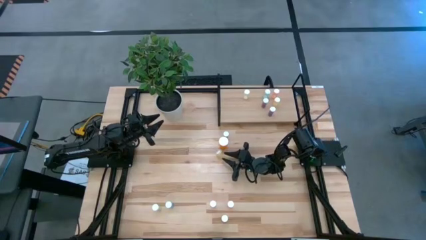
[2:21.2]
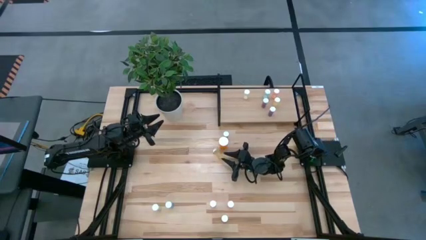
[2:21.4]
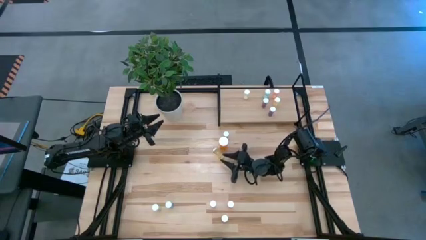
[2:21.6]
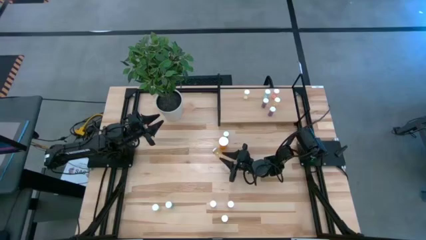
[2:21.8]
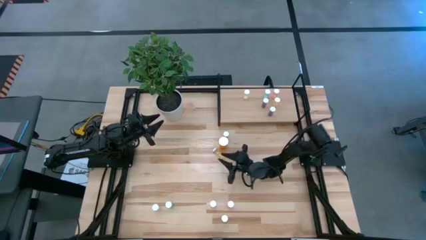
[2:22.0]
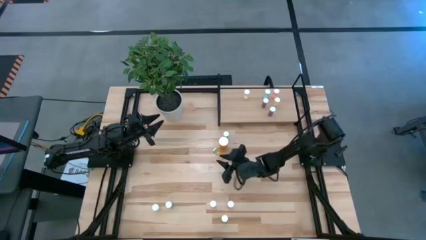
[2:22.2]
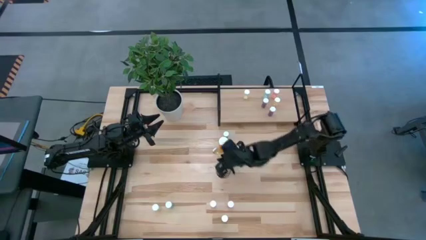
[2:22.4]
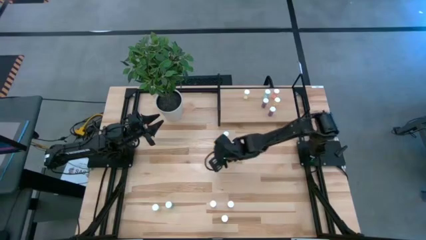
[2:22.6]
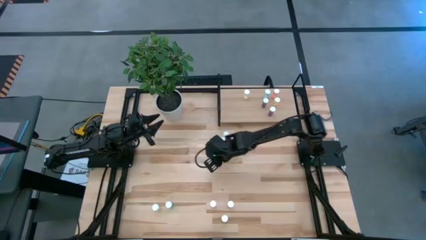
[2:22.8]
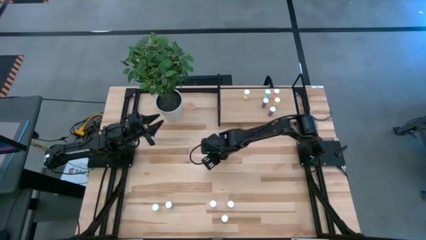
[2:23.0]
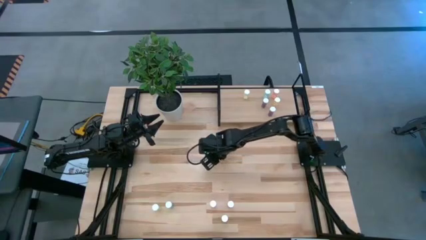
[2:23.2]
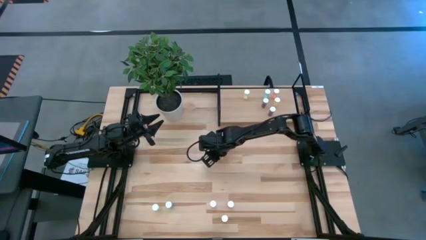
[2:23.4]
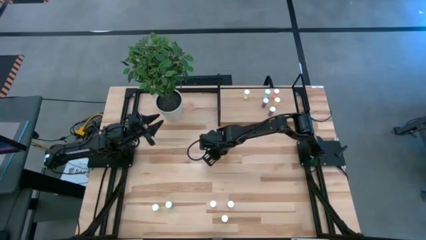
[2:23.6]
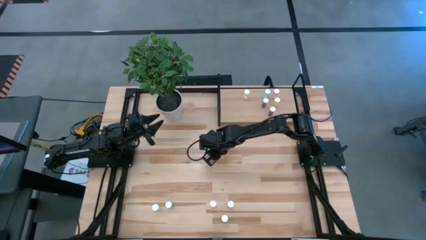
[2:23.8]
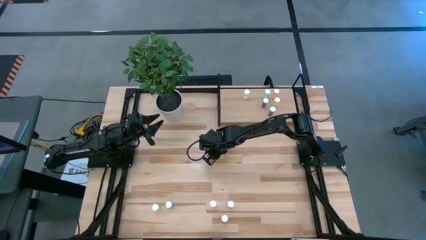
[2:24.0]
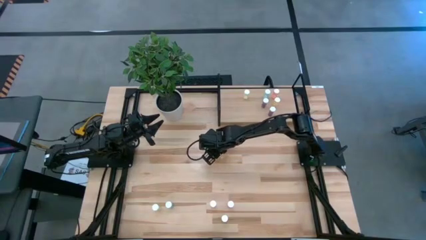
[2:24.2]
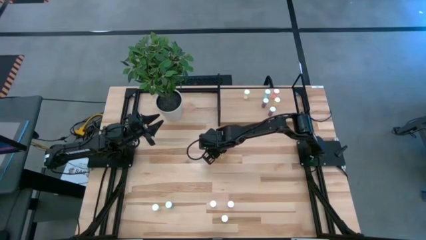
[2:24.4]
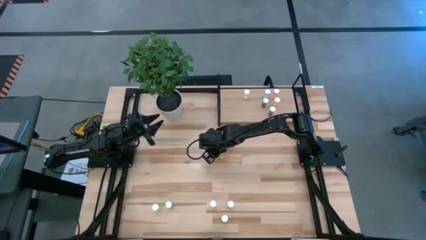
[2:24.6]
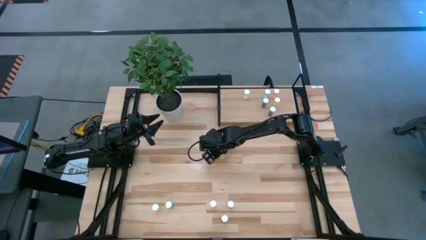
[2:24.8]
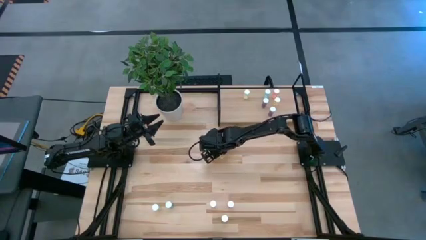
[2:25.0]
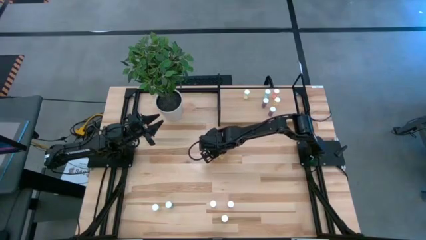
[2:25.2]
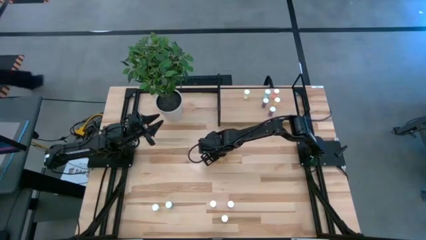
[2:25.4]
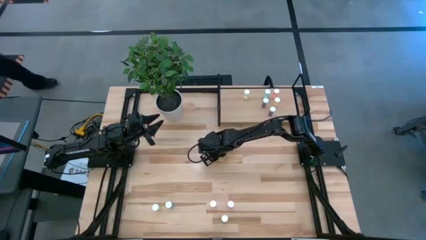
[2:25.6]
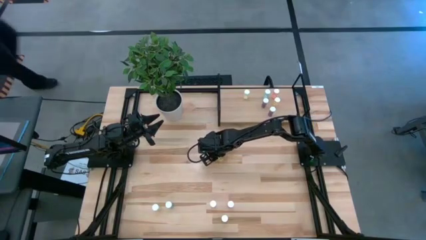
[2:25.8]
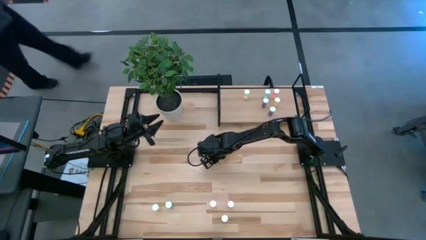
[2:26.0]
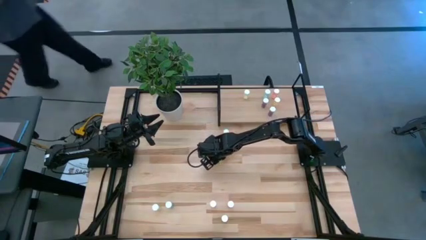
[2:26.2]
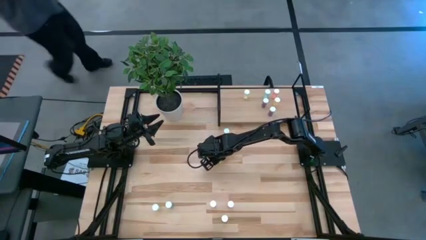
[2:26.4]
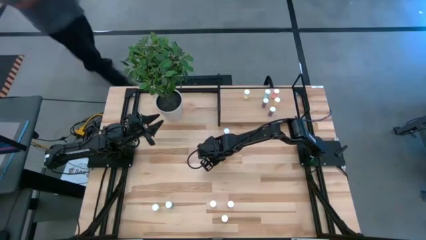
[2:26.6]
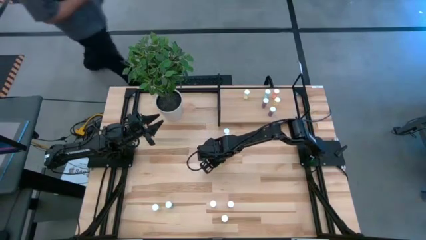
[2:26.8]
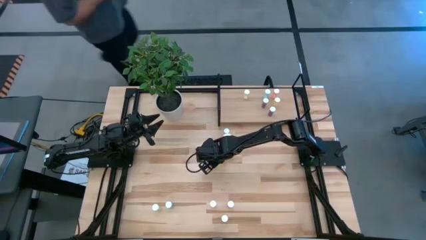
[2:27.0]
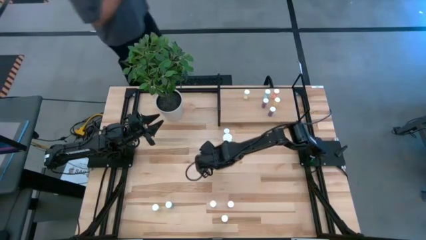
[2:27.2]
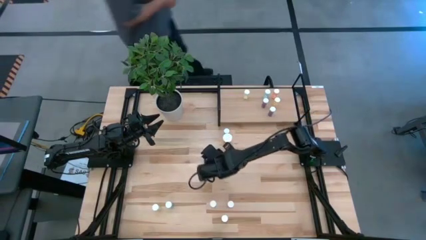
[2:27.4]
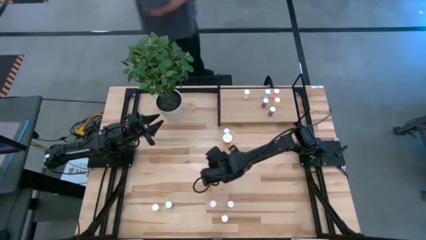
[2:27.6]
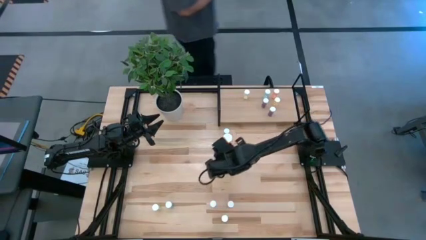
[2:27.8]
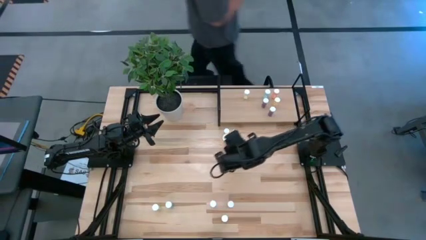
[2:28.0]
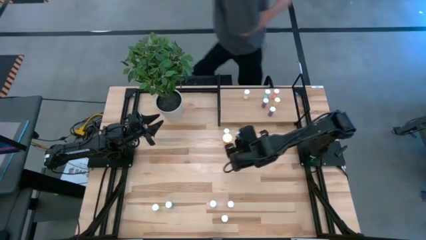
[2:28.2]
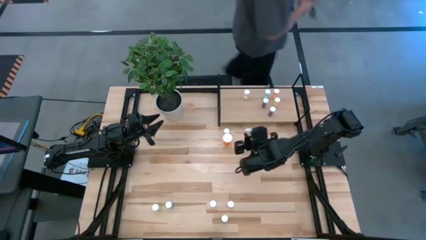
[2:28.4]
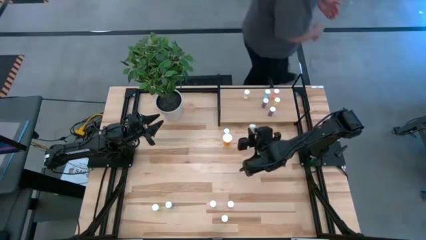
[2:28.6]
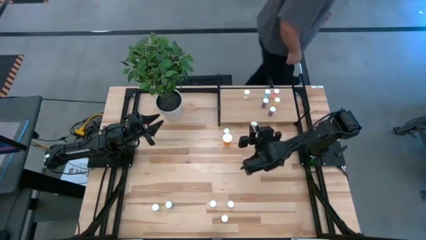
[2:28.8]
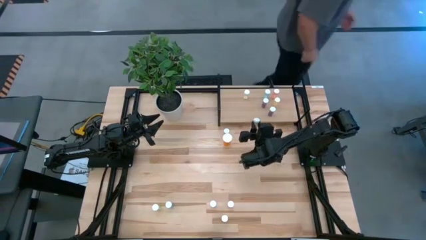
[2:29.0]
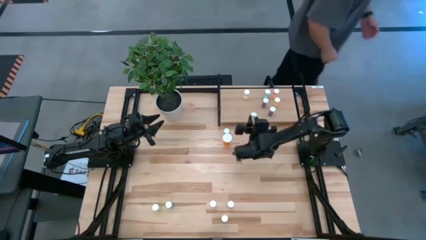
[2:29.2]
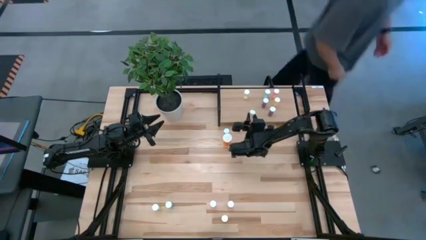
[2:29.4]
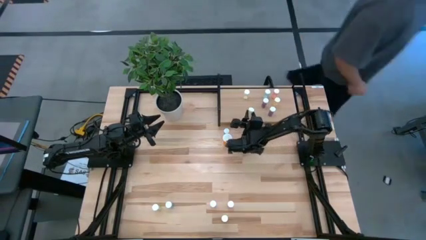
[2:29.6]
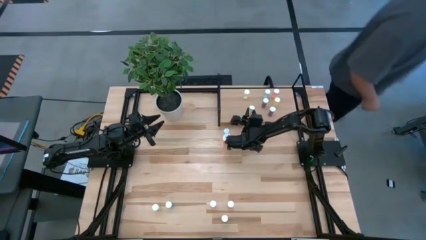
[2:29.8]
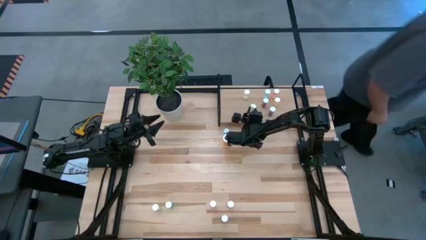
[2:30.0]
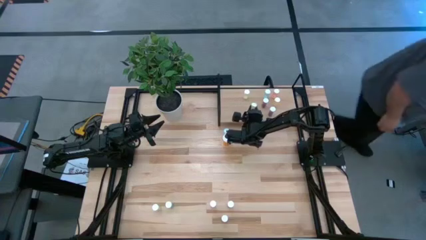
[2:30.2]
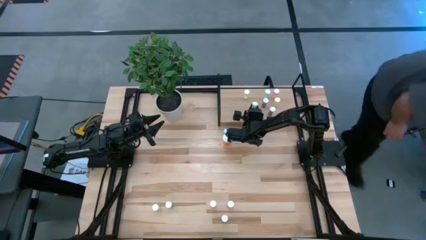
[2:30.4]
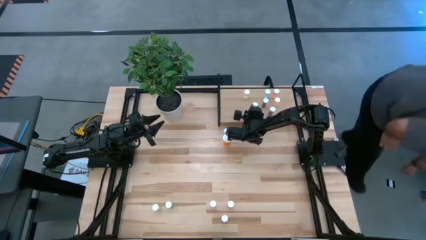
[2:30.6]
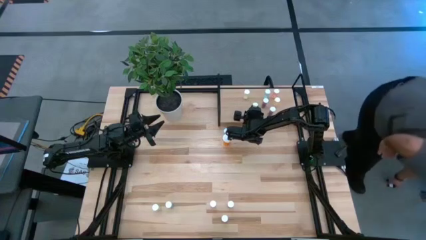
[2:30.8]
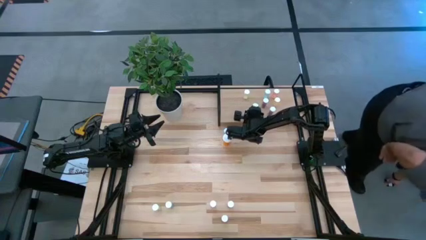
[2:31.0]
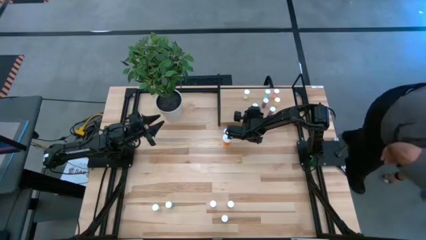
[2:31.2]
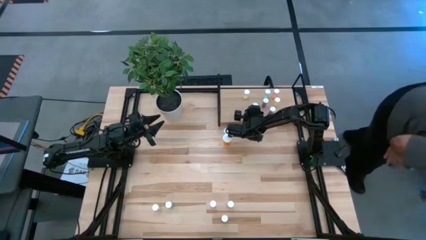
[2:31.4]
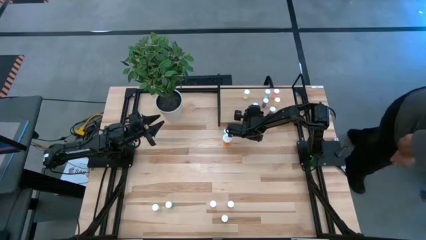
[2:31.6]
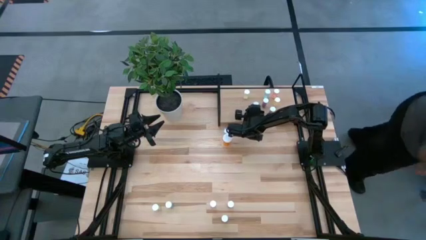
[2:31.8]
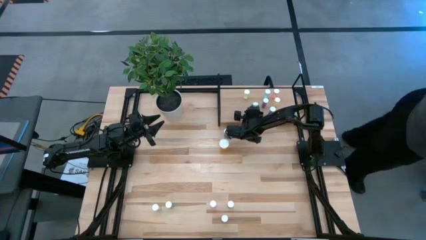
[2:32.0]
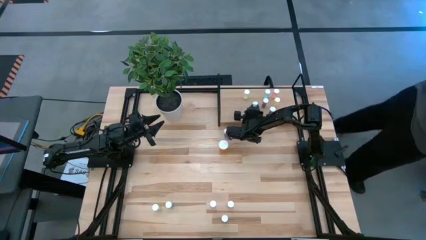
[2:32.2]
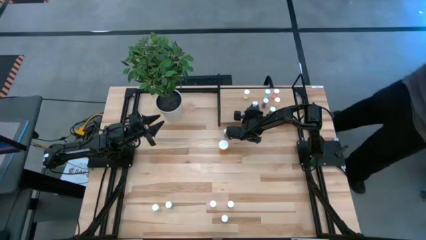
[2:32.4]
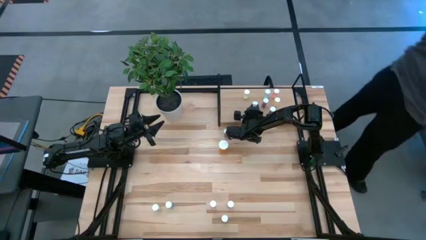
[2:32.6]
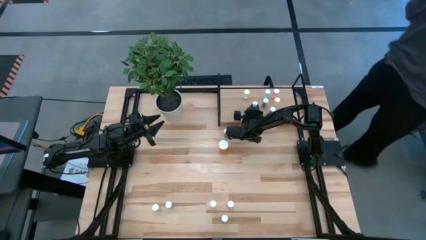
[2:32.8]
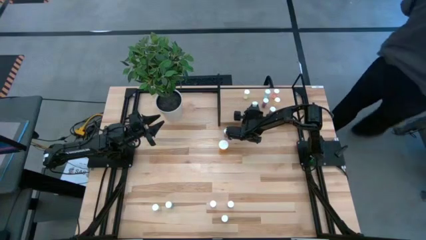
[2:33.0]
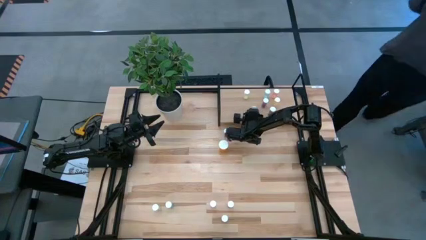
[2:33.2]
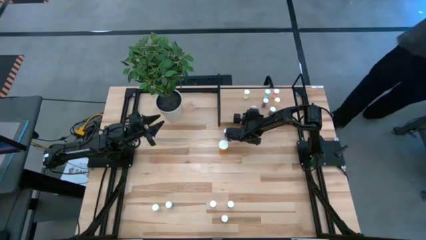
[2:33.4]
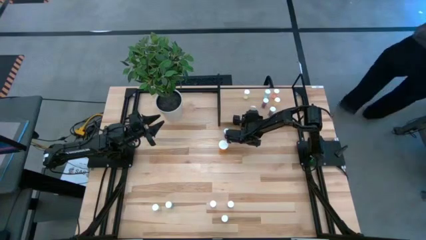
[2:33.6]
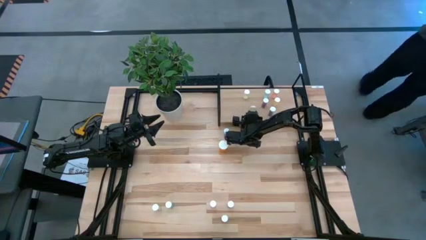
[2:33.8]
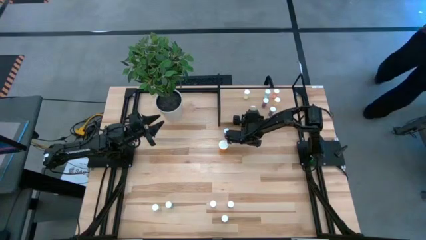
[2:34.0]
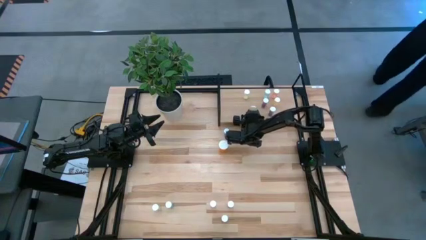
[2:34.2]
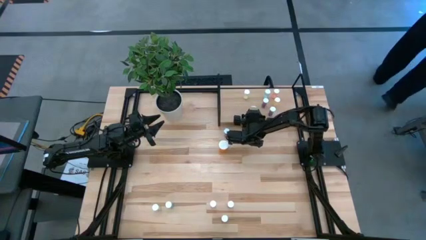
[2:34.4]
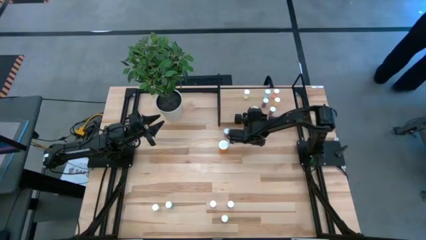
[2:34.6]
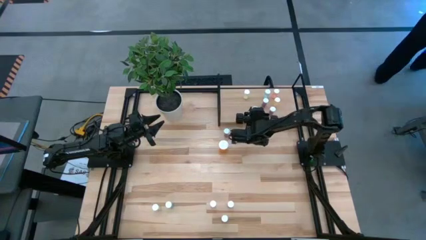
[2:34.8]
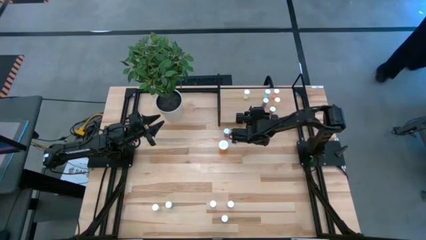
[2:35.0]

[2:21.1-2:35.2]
Task: Pick and place medicine bottles onto shelf by color
Put the right yellow pill bottle on the shelf

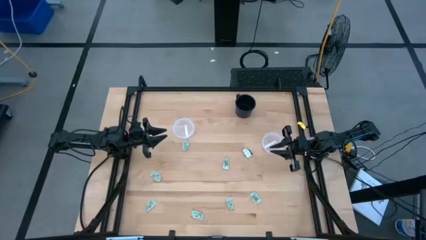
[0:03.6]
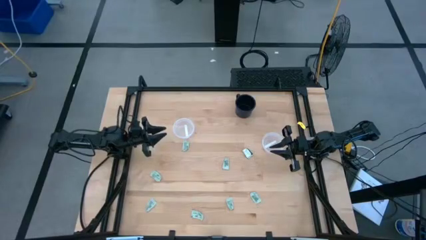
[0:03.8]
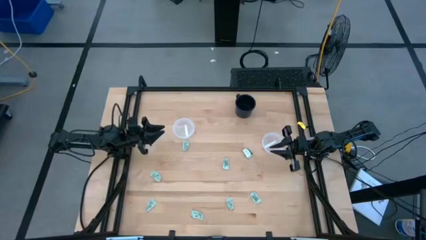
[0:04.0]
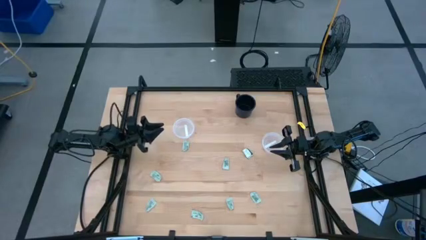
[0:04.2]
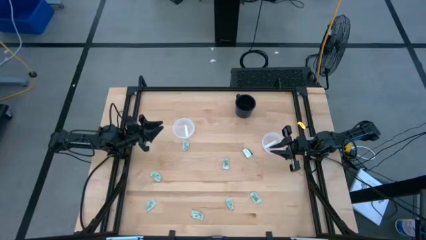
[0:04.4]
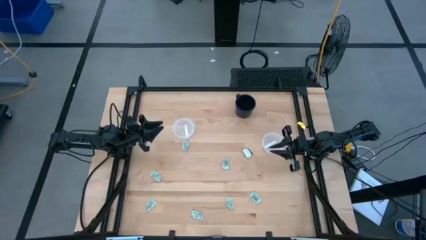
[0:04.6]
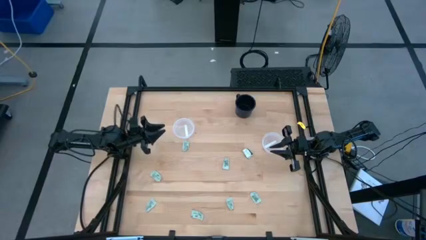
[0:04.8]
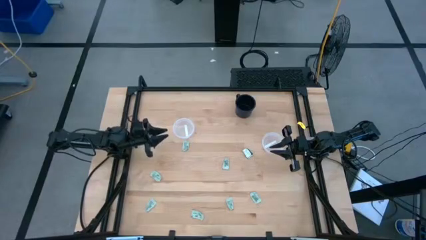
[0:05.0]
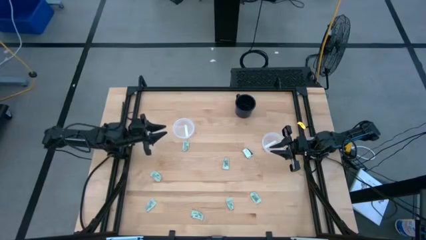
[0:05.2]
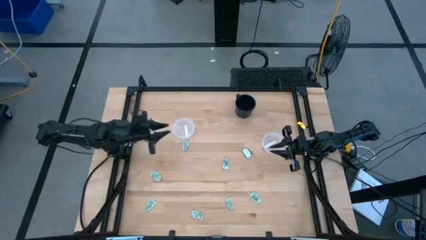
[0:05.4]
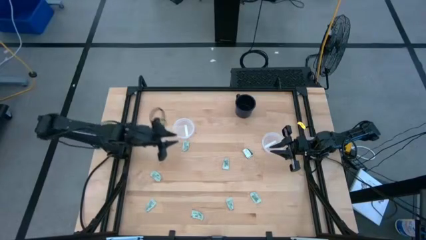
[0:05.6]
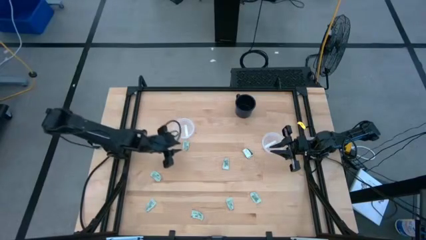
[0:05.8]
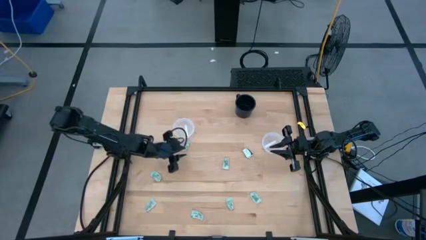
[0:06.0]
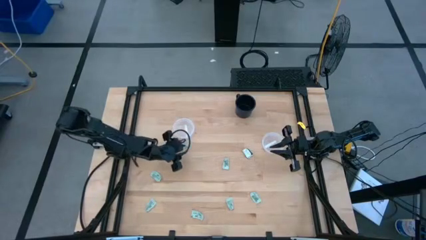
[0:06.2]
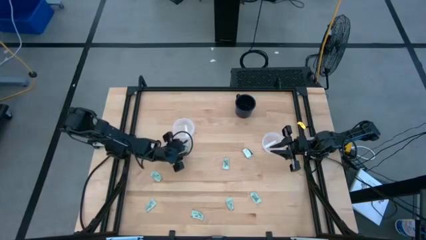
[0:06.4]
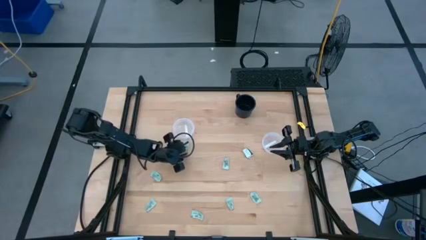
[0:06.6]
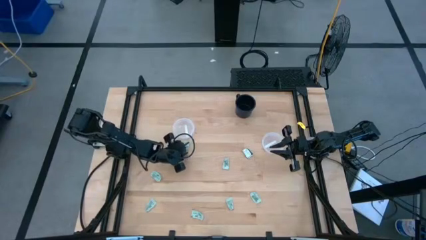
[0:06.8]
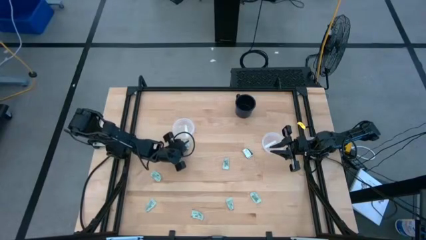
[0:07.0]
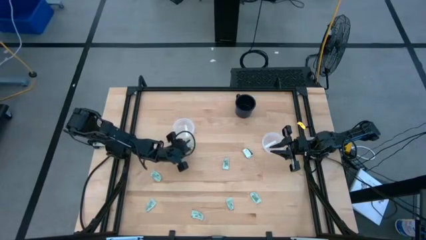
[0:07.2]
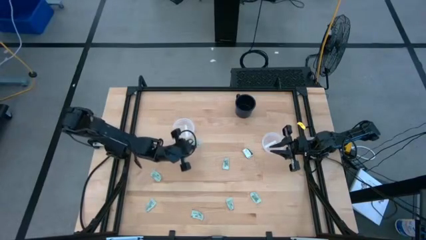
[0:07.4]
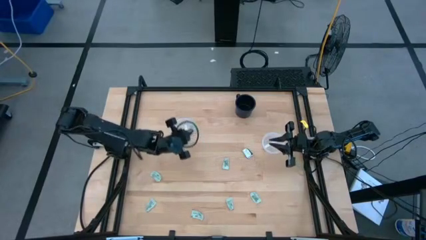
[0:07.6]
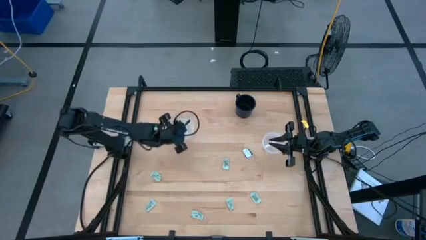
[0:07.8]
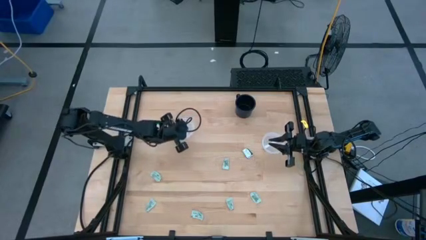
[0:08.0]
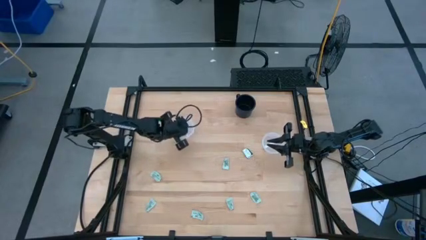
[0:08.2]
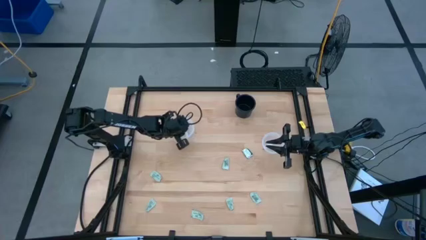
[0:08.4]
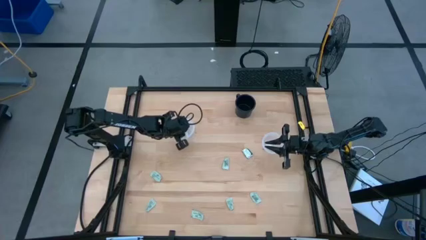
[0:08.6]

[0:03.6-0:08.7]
Task: Pick and place items into bin
Put the white stevia packet into the left transparent bin
